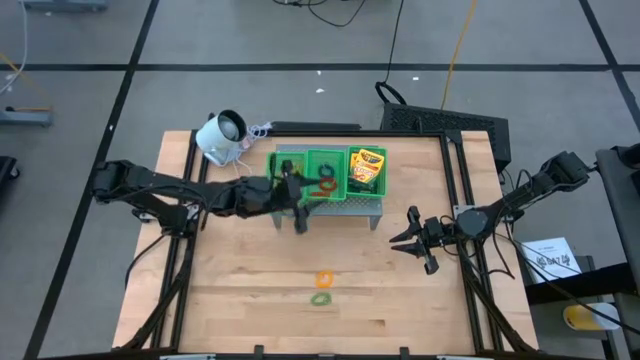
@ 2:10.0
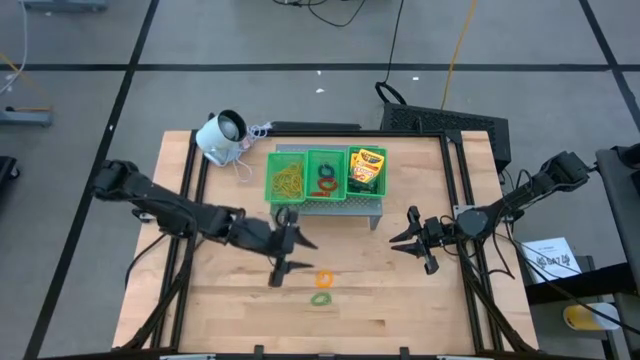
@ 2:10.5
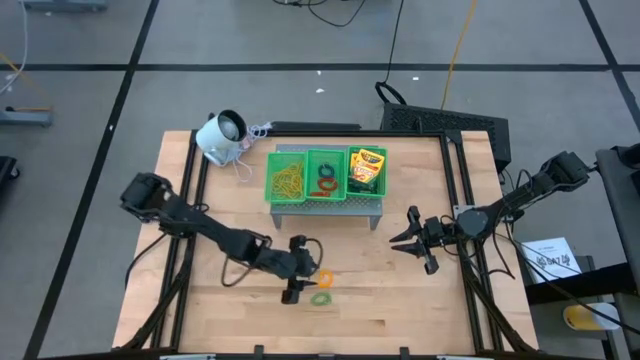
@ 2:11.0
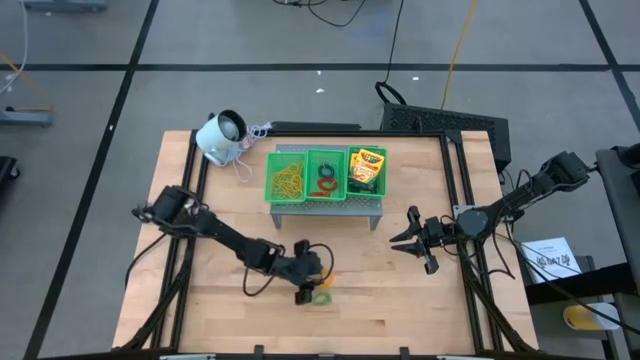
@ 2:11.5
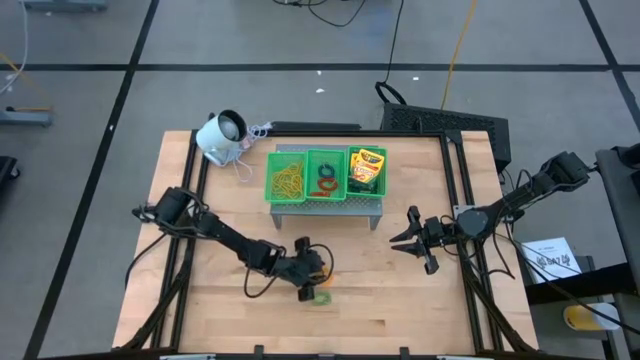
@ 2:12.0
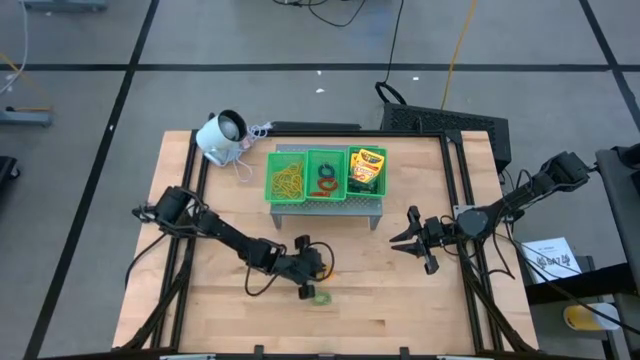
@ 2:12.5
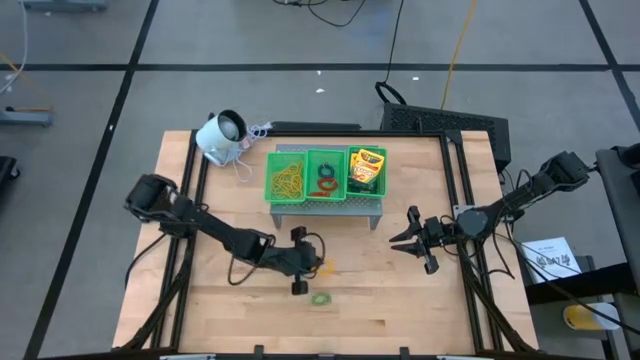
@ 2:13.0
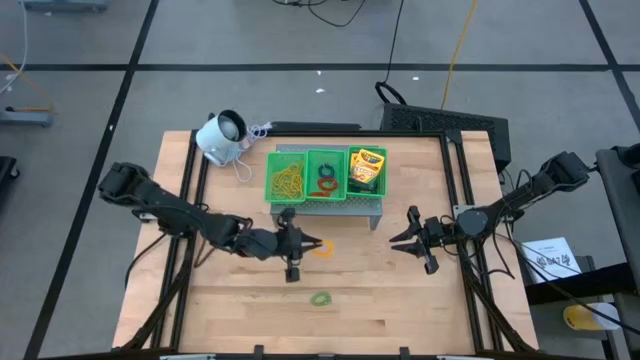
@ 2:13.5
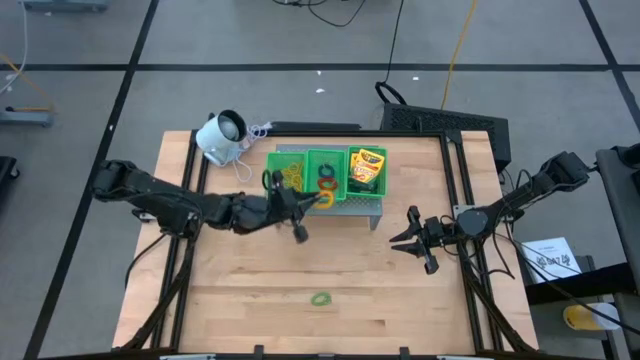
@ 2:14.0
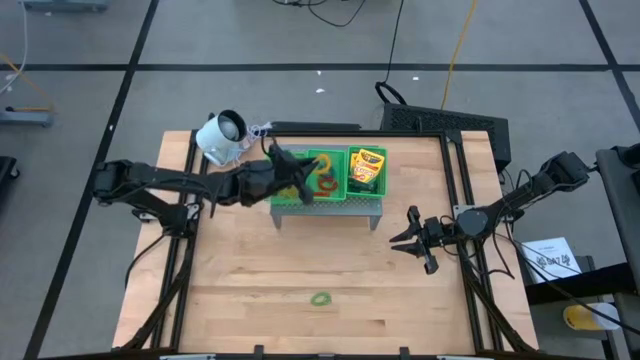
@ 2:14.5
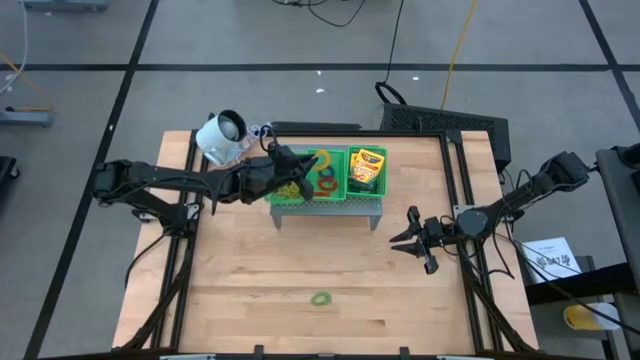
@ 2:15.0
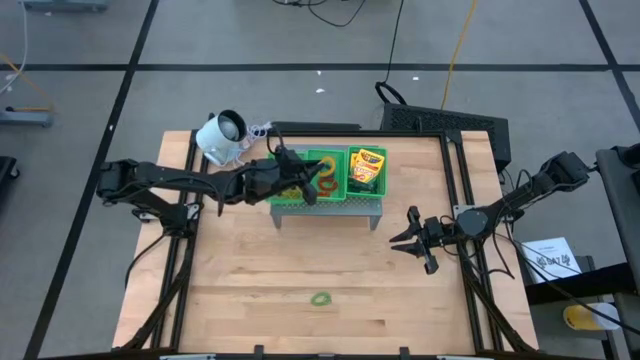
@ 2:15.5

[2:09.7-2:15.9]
Task: Pick & Place Office Desk Supplies
Put the yellow spring keychain into the center green basket

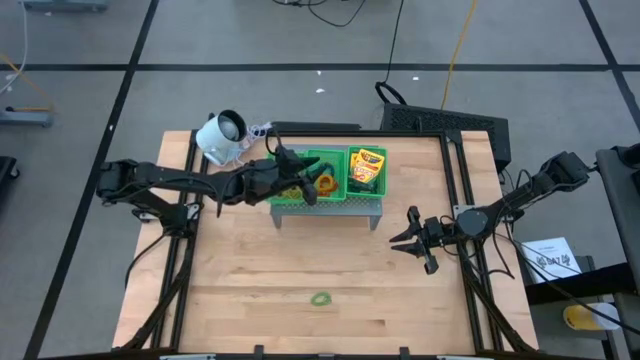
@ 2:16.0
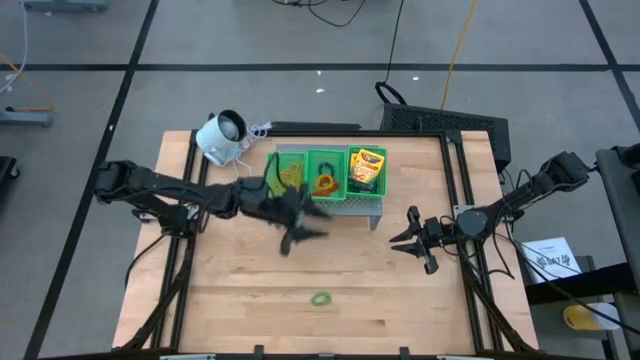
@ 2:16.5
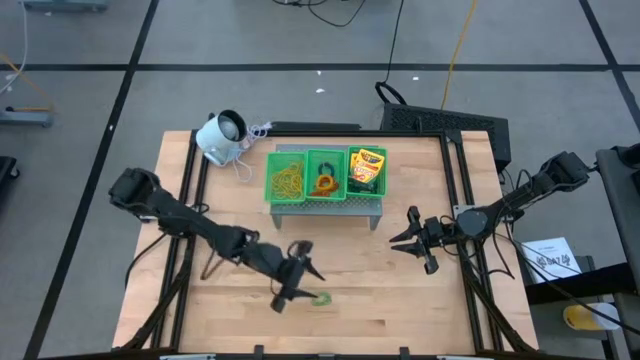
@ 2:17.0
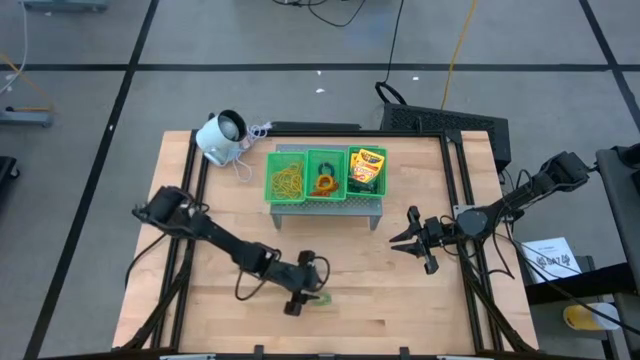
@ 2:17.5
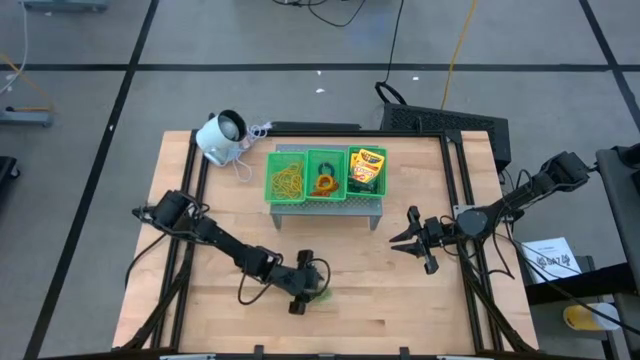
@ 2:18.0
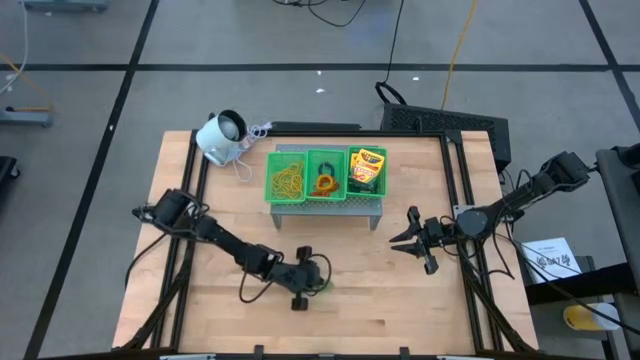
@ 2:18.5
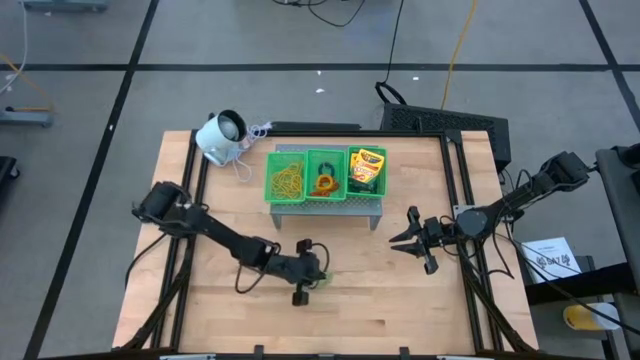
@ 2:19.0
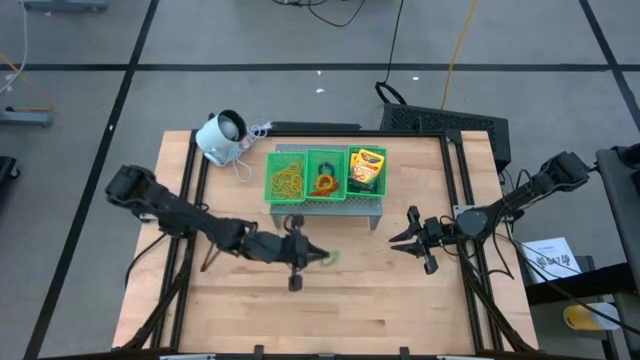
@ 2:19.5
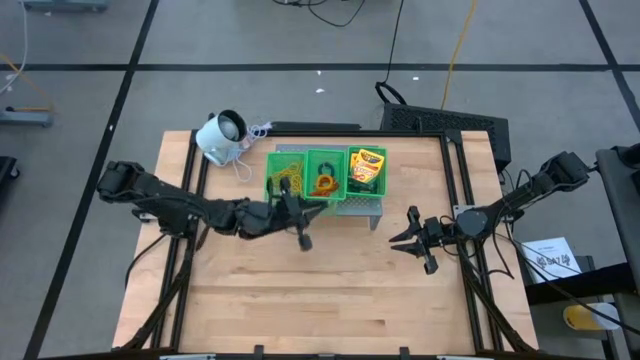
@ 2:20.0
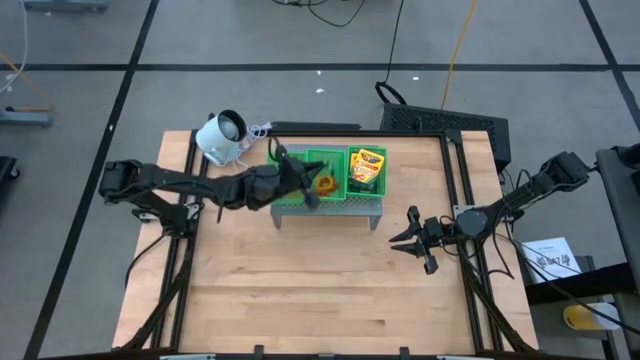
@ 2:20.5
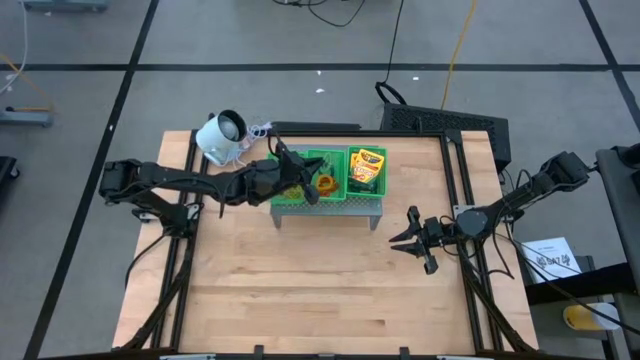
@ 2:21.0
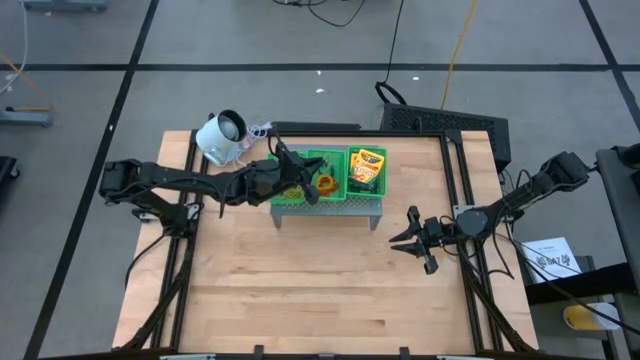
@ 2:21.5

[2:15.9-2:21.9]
Put the green spring keychain into the center green basket

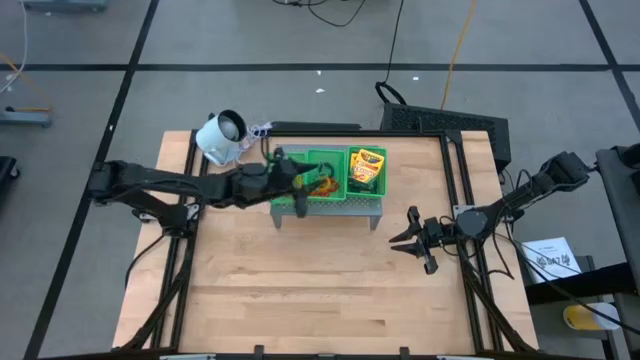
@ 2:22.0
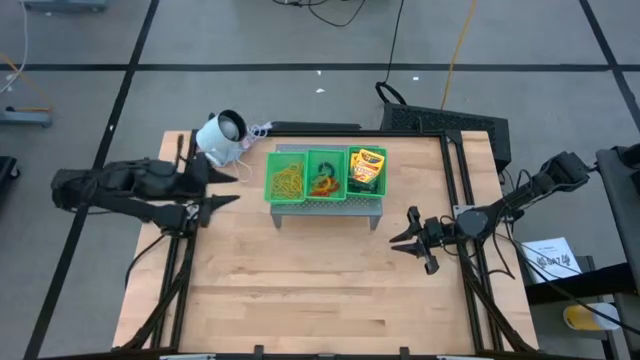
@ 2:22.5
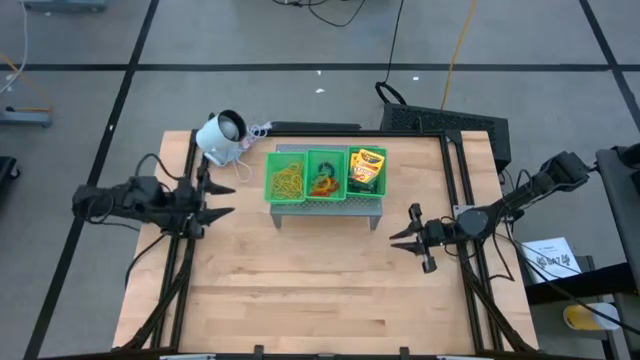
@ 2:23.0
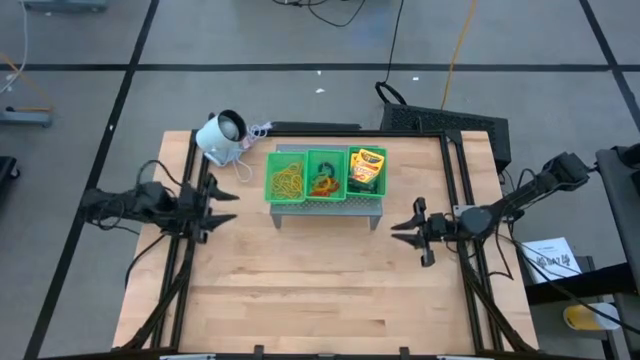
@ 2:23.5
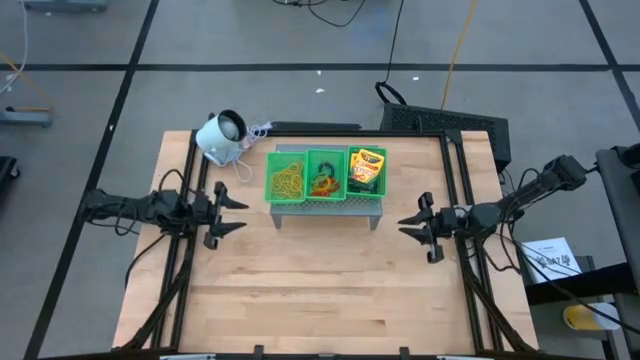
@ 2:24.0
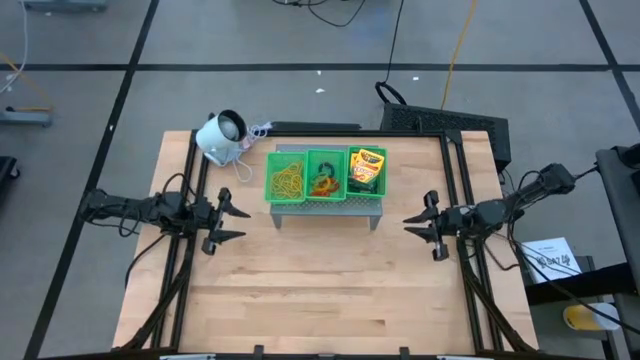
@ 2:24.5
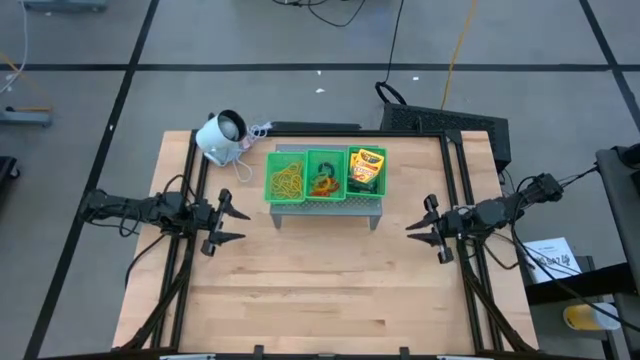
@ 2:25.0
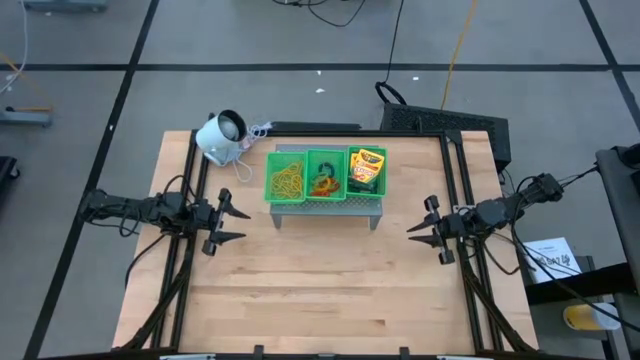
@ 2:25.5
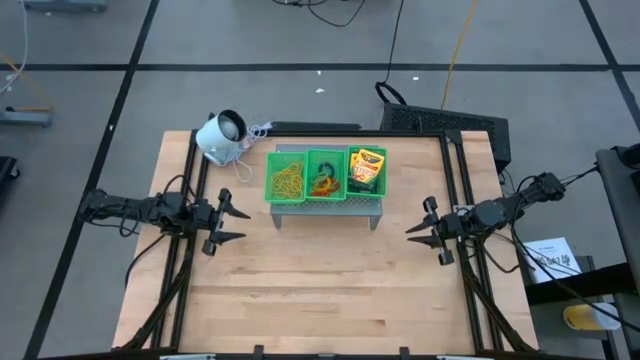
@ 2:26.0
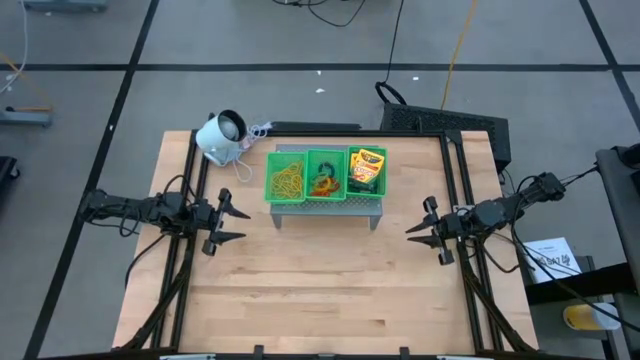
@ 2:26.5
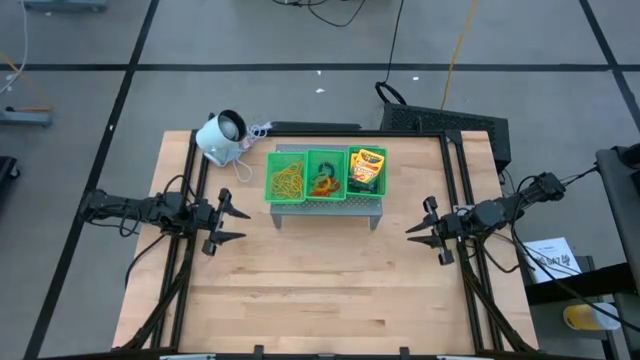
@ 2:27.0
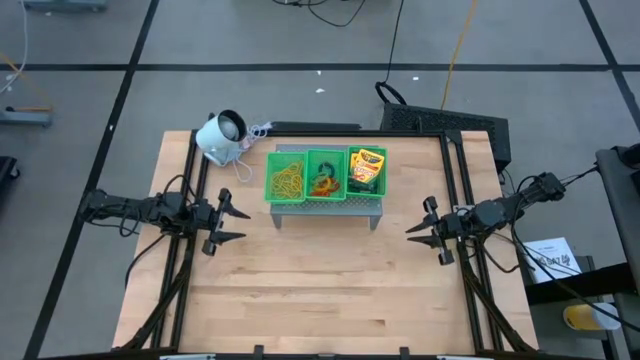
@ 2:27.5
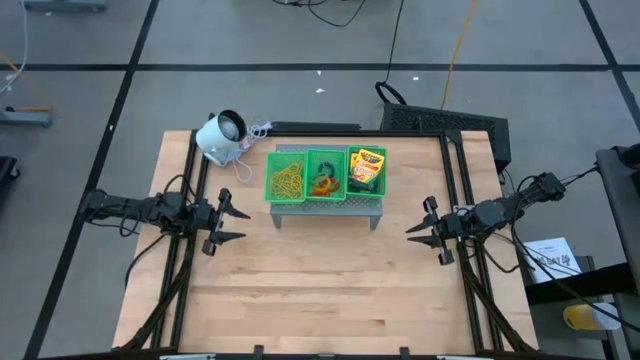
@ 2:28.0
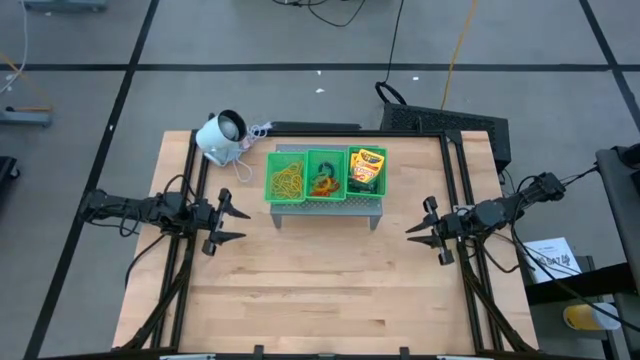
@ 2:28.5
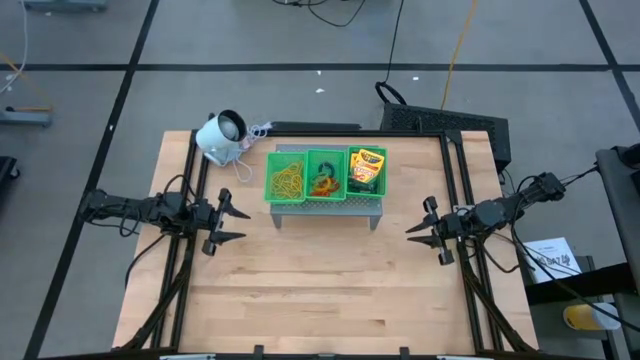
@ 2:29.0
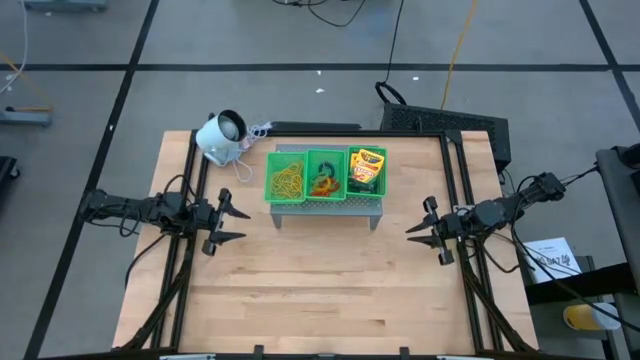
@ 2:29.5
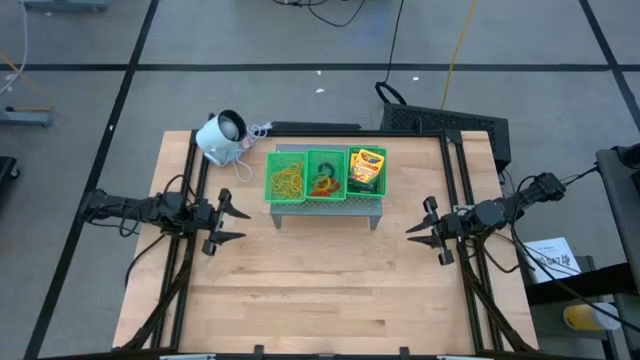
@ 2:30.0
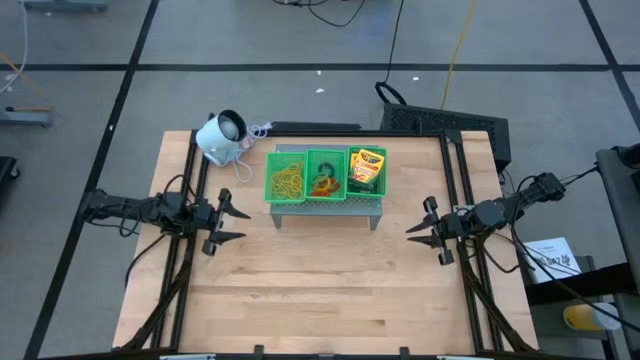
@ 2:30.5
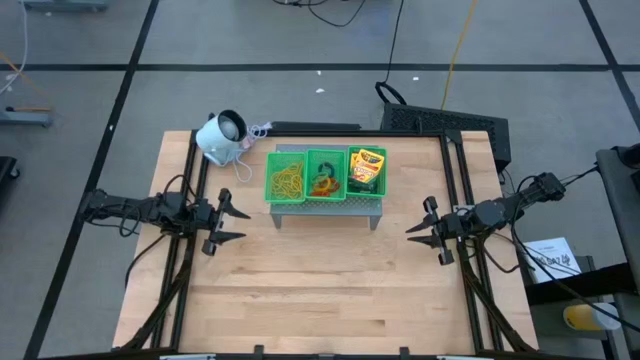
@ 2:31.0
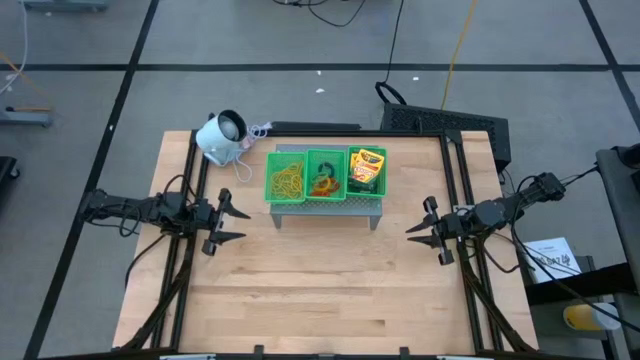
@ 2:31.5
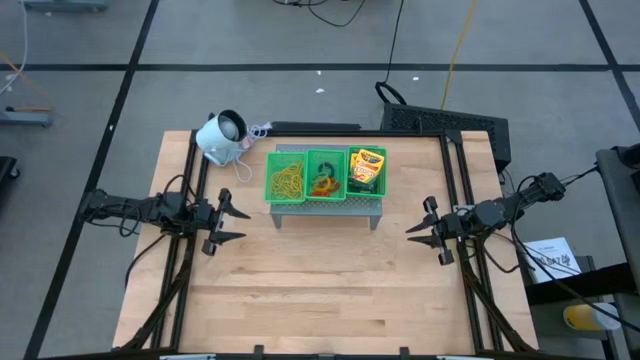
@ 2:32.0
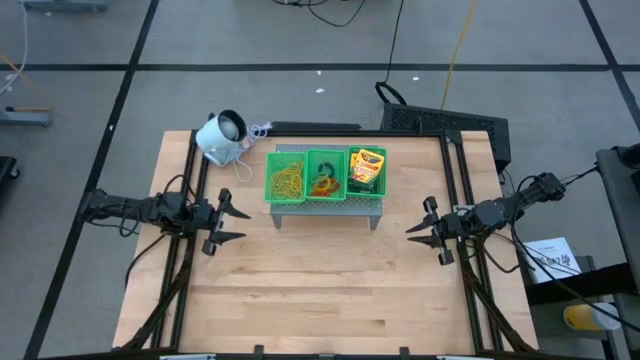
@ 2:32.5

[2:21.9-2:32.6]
Return to home position
